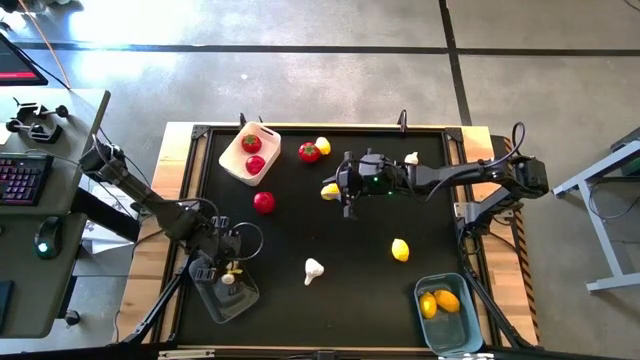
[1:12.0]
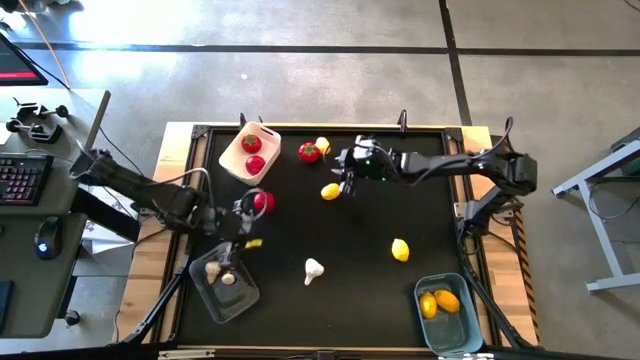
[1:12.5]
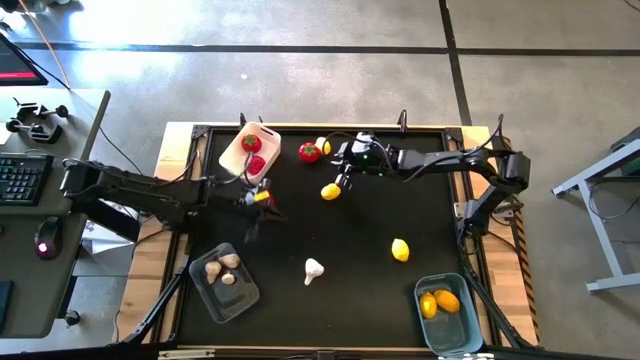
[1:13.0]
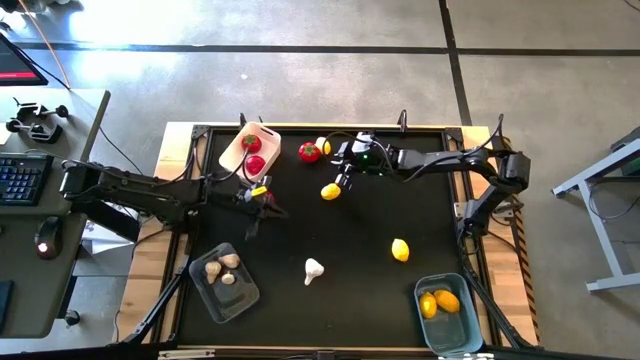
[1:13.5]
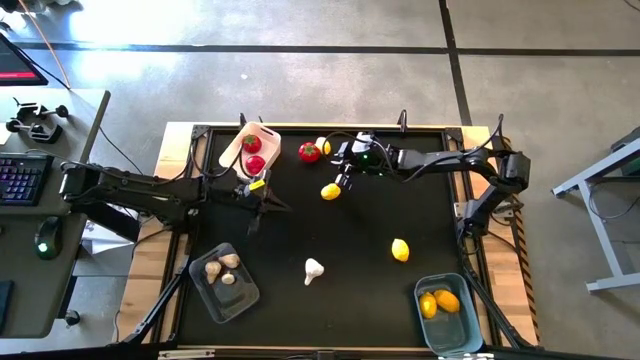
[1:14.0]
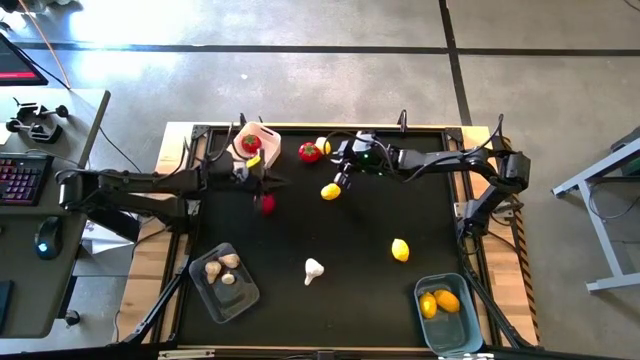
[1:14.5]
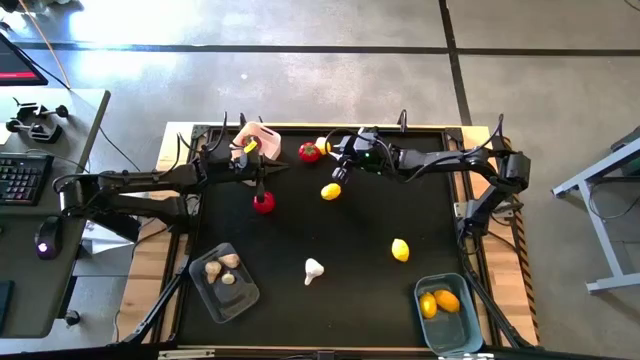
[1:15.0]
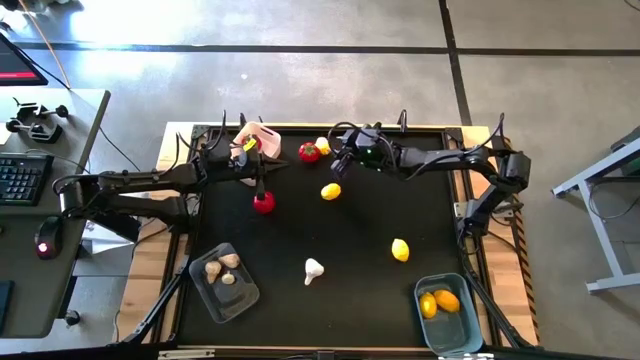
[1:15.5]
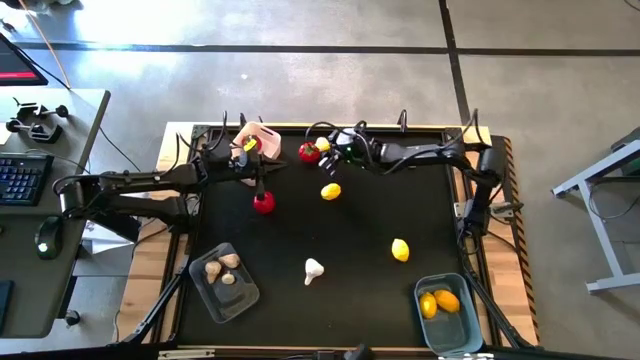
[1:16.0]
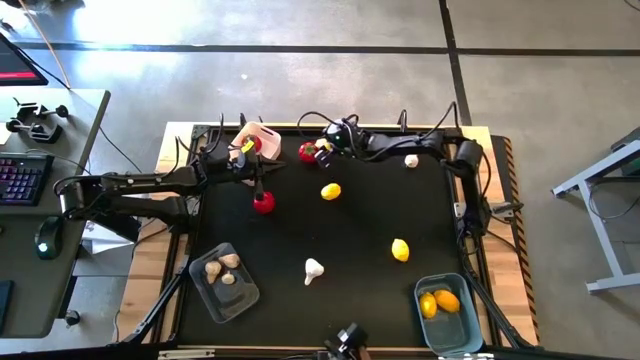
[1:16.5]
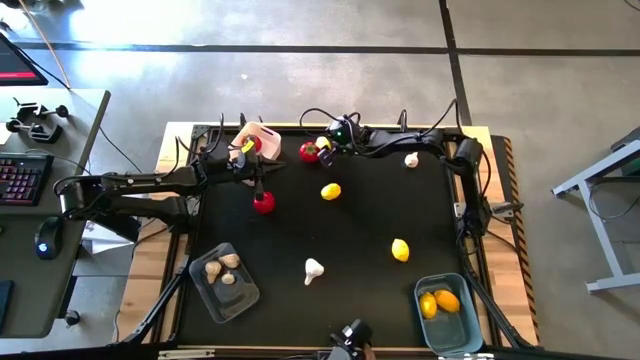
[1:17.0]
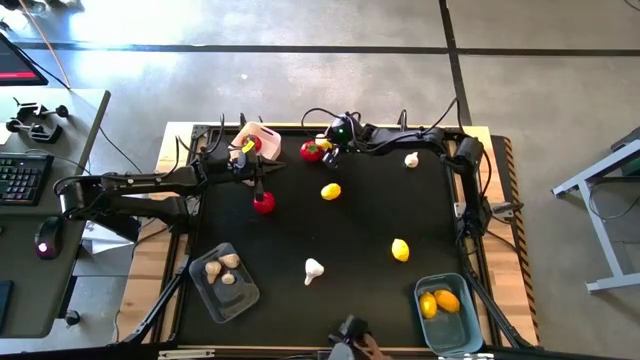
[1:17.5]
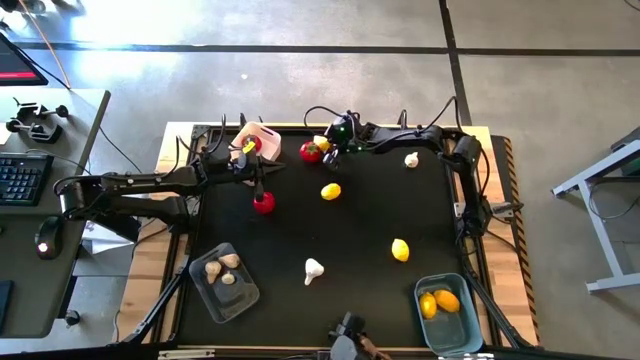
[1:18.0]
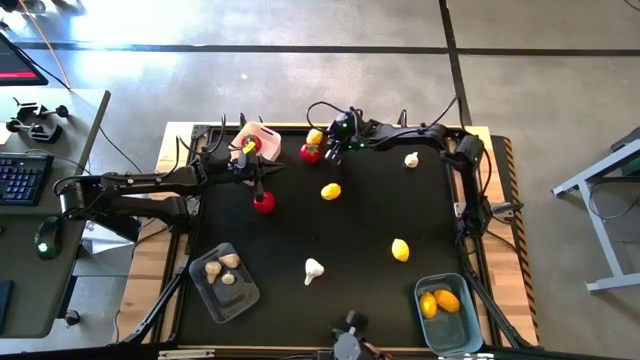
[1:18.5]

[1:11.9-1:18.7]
Task: Sort produce into baskets
Put the yellow lemon into the blue bin

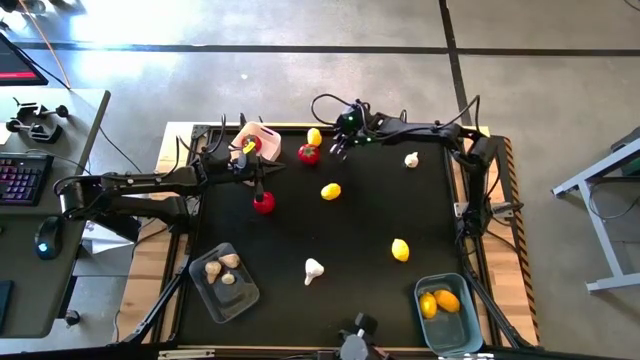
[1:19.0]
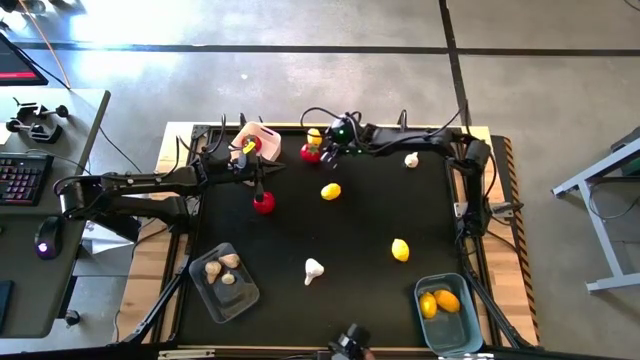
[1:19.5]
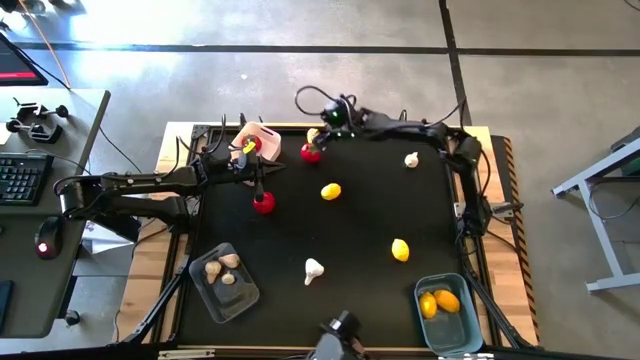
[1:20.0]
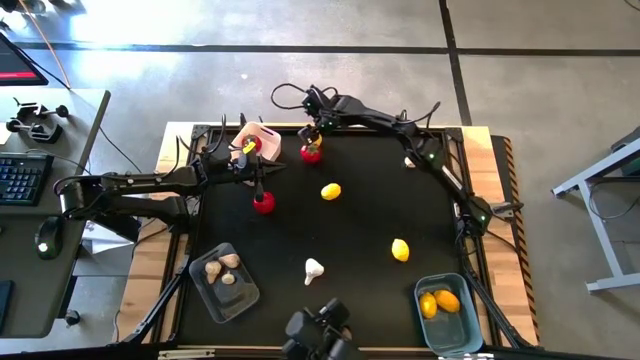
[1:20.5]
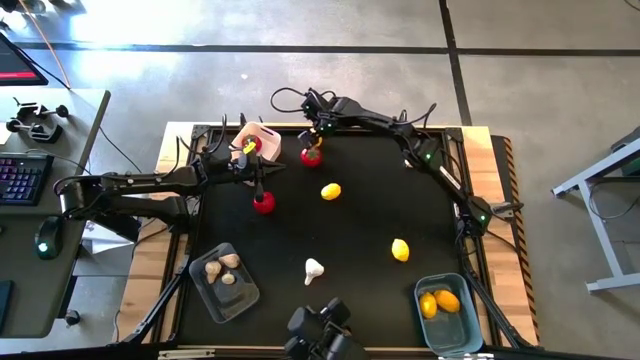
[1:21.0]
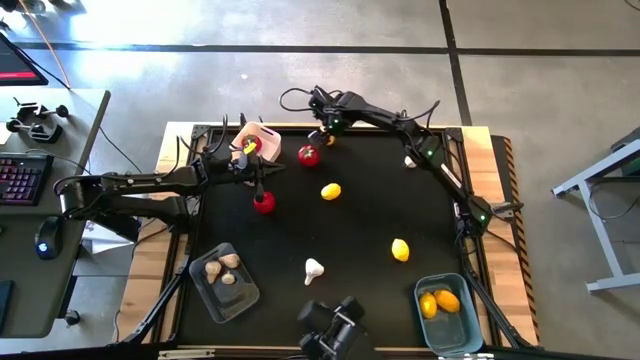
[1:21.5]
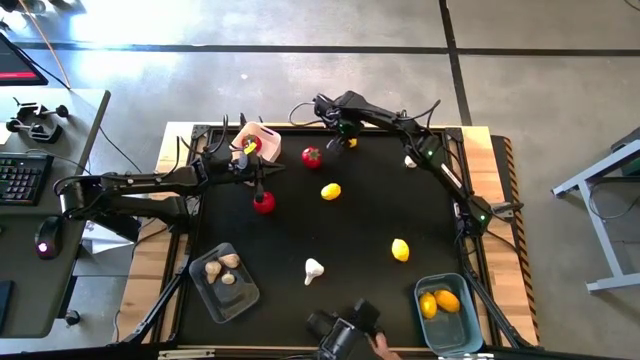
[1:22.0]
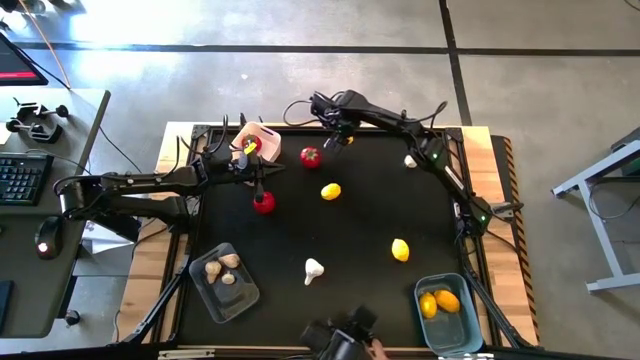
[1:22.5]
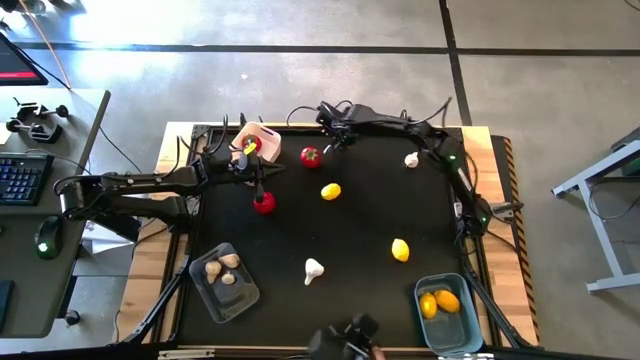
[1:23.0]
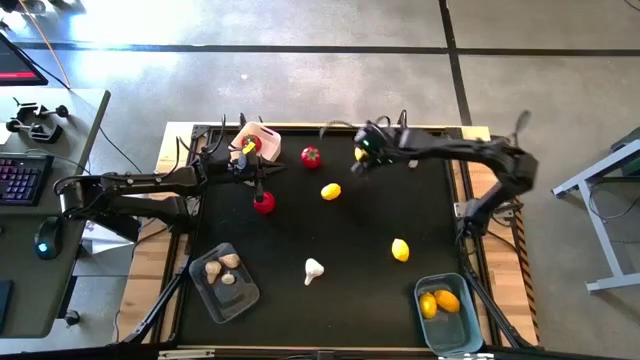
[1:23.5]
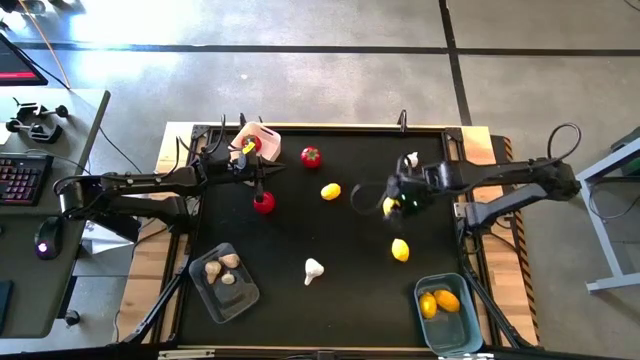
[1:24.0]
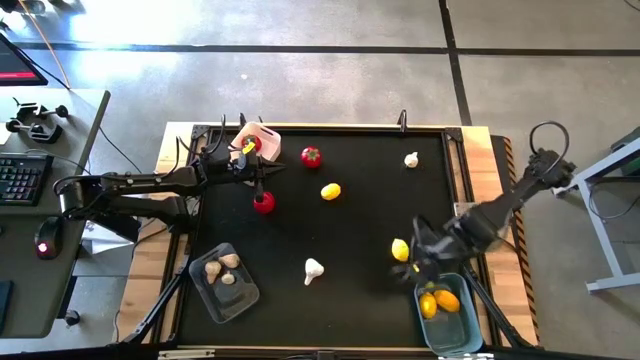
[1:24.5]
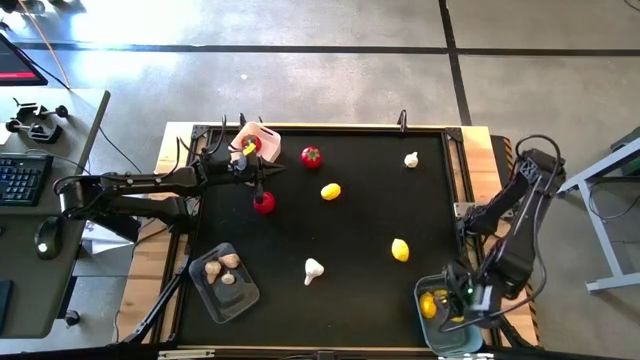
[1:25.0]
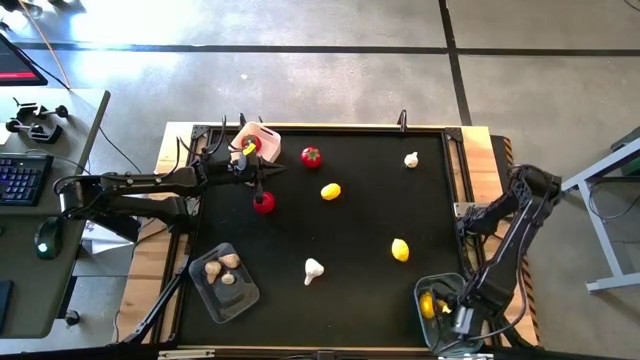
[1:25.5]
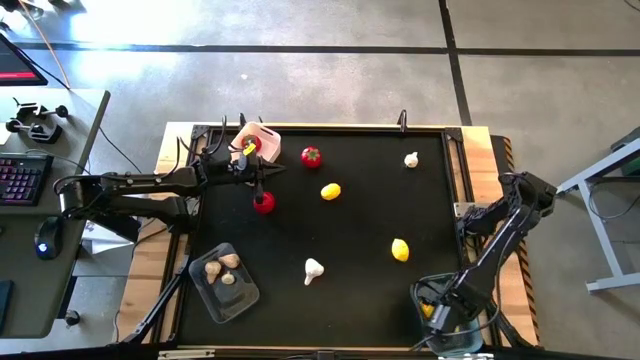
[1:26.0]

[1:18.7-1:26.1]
Put the yellow lemon into the blue bin

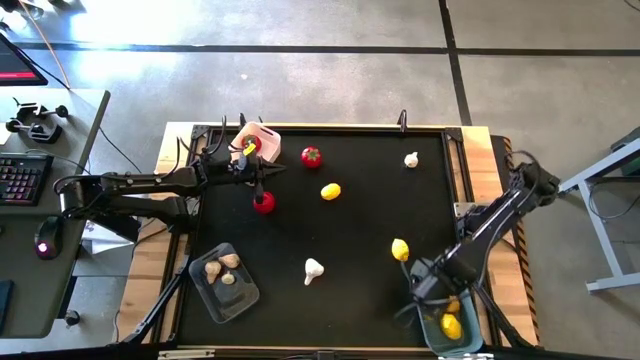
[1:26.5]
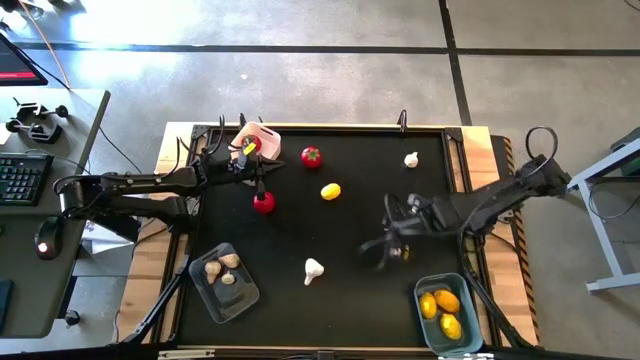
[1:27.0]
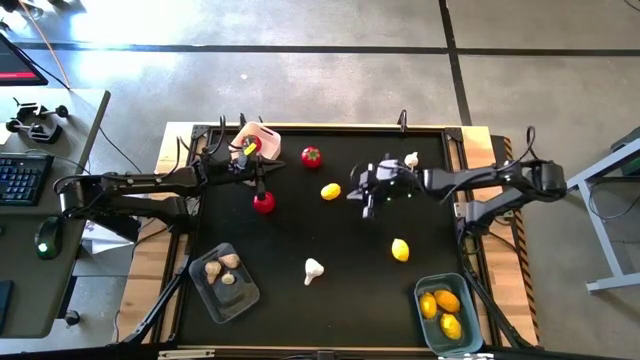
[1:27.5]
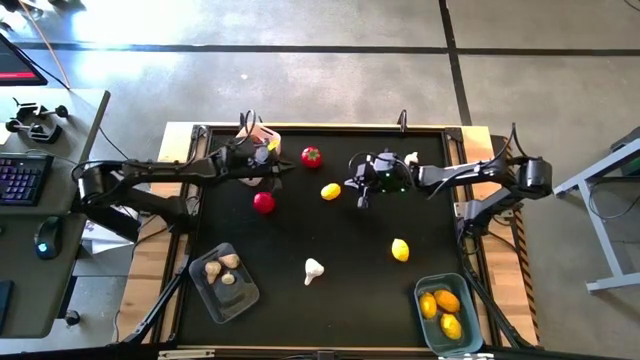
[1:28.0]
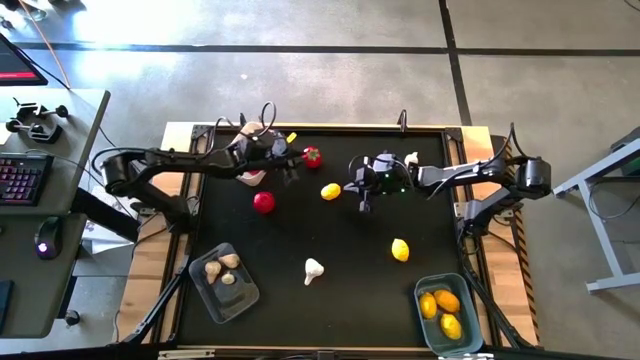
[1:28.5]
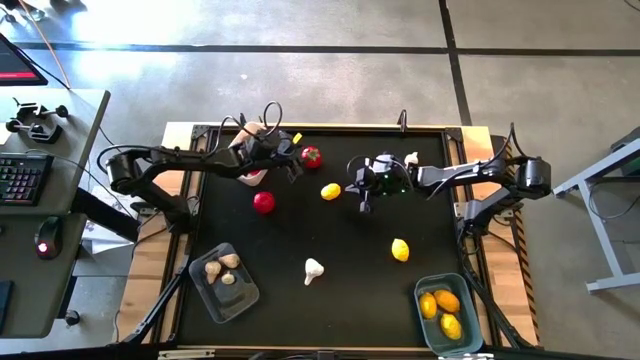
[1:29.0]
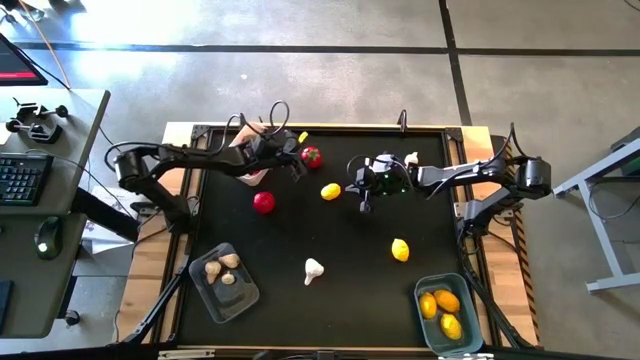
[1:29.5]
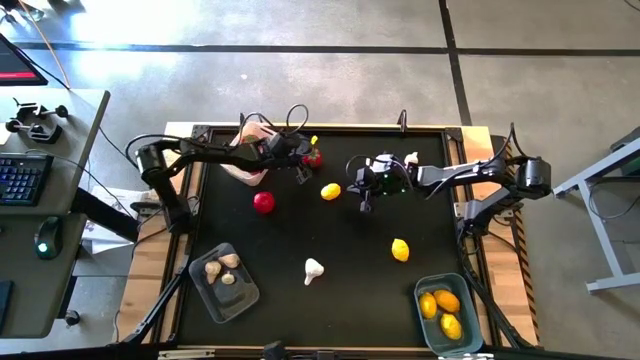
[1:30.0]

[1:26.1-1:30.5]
Put the red tomato into the white bin

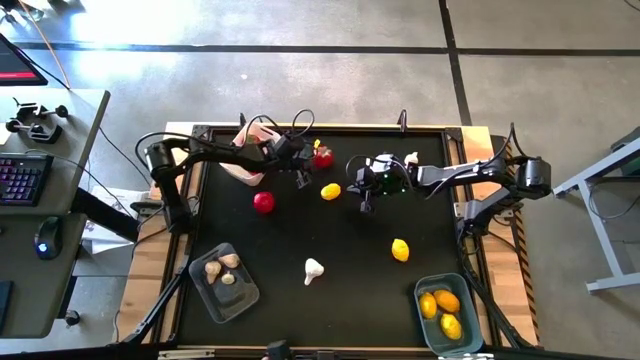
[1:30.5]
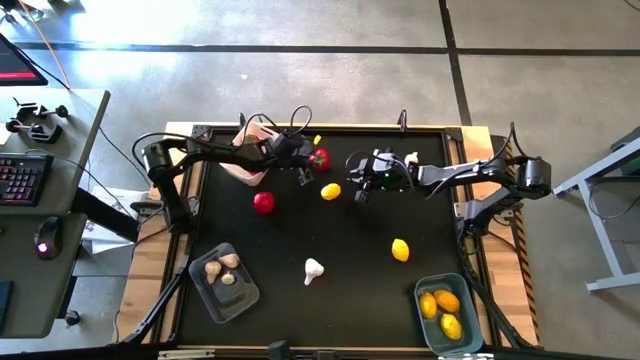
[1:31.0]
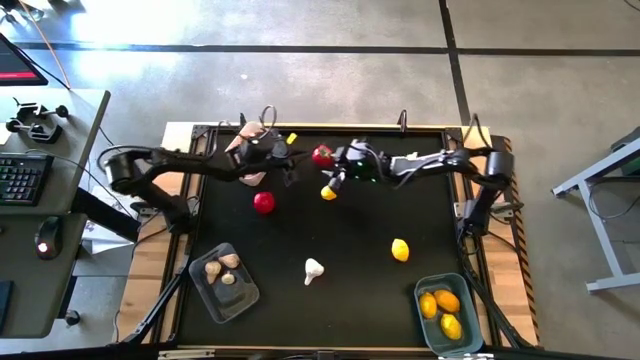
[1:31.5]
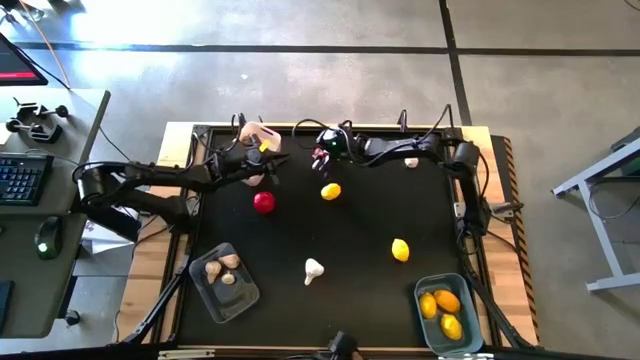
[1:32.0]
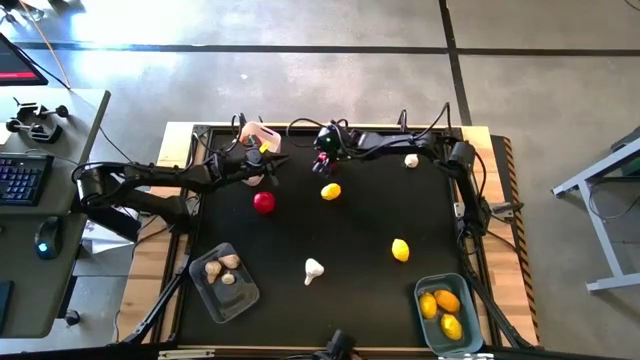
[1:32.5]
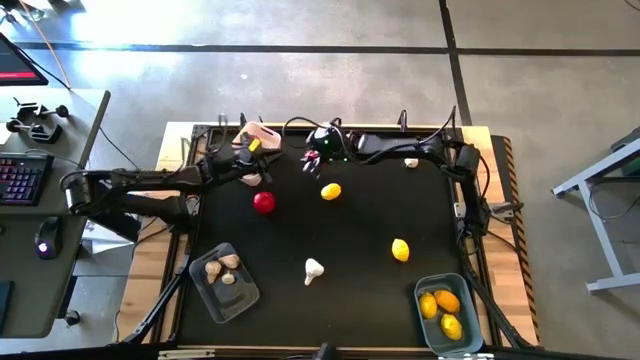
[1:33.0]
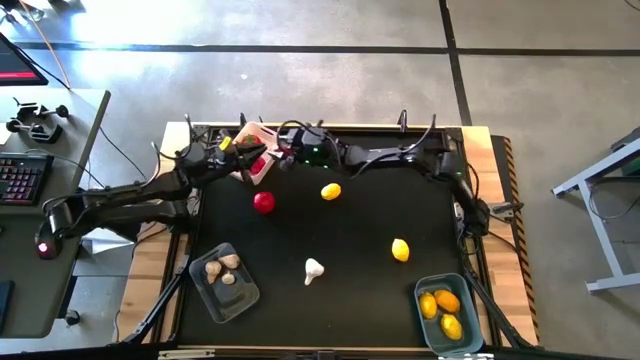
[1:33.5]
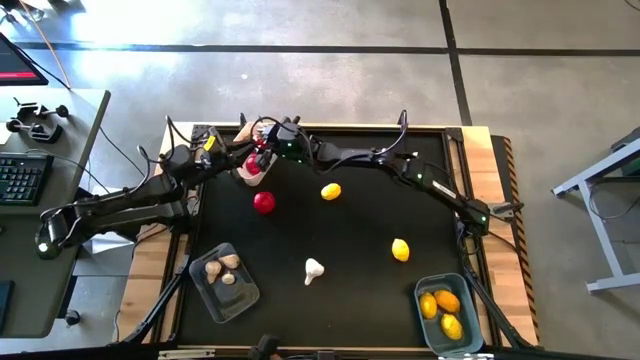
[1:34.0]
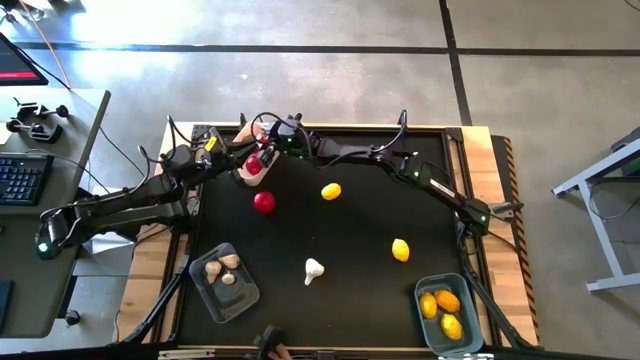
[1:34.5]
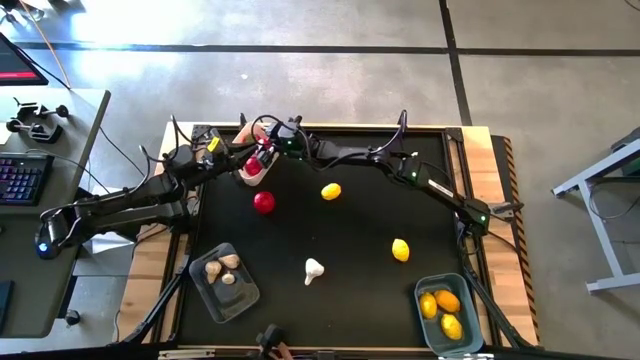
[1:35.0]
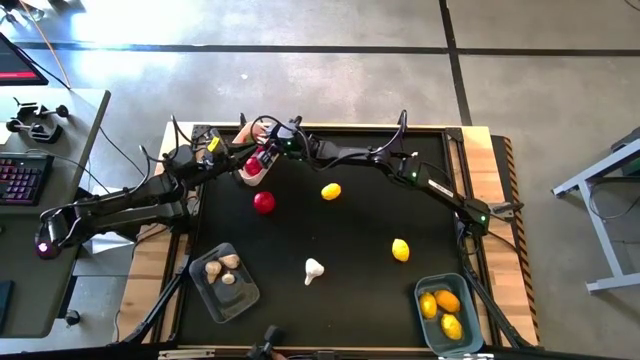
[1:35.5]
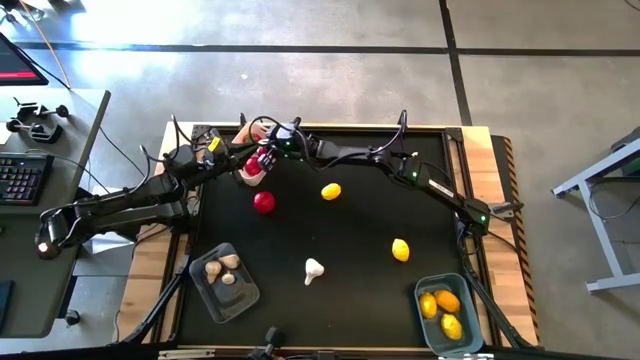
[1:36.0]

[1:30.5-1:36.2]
Put the red tomato into the white bin
